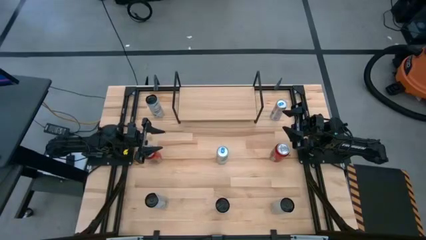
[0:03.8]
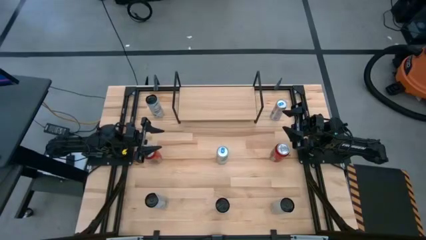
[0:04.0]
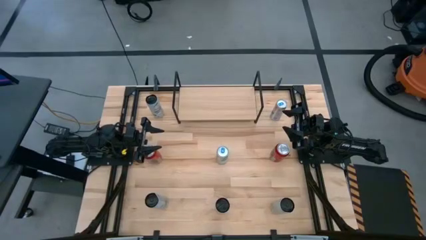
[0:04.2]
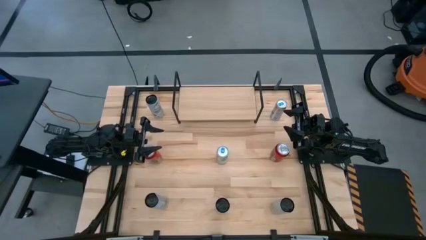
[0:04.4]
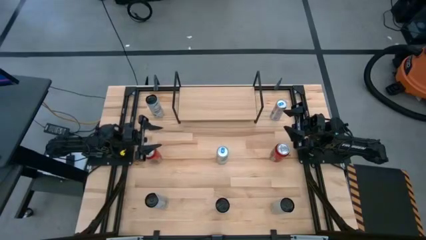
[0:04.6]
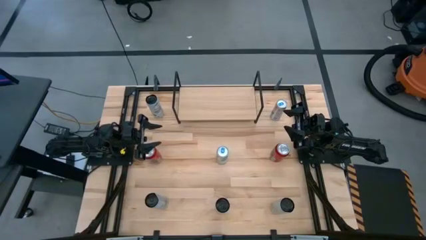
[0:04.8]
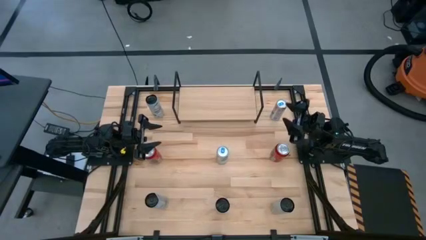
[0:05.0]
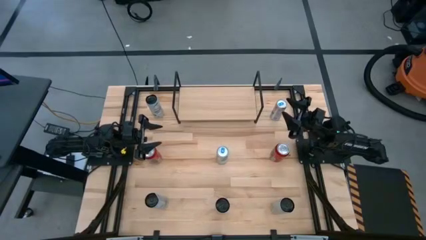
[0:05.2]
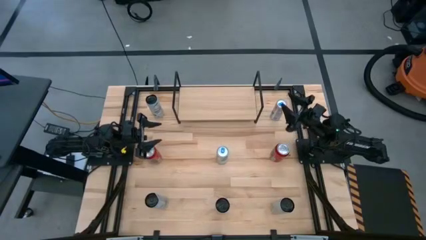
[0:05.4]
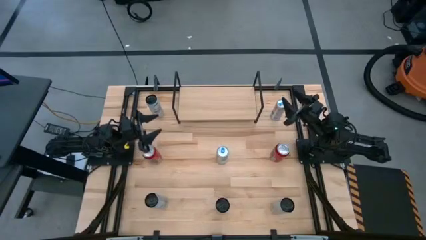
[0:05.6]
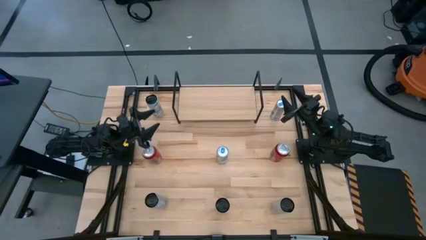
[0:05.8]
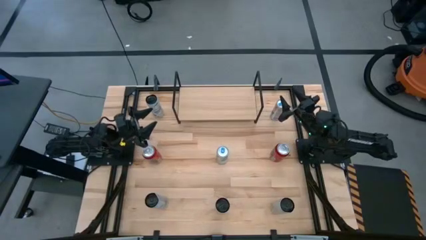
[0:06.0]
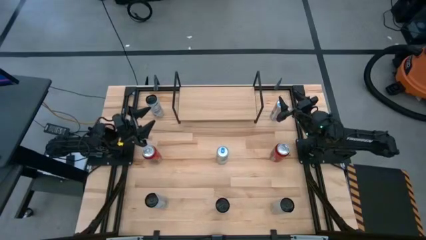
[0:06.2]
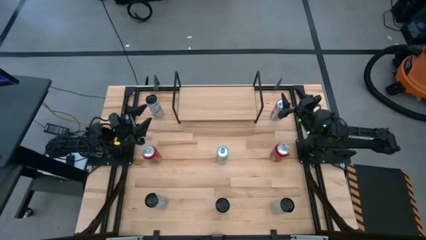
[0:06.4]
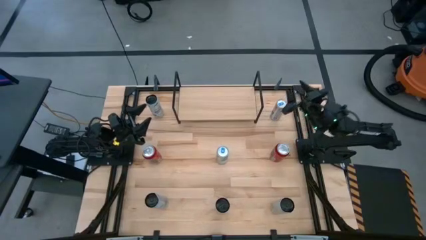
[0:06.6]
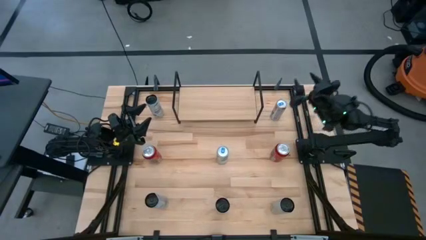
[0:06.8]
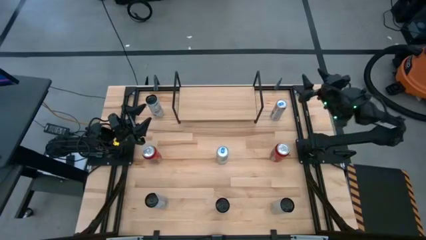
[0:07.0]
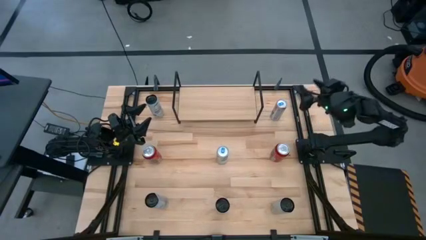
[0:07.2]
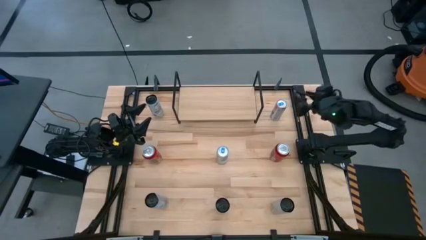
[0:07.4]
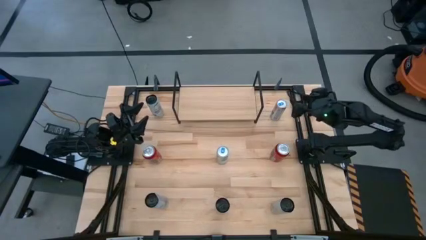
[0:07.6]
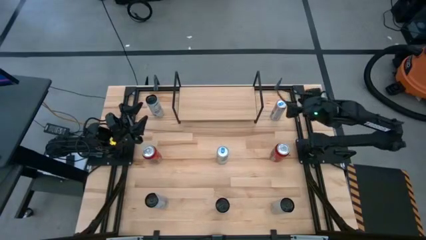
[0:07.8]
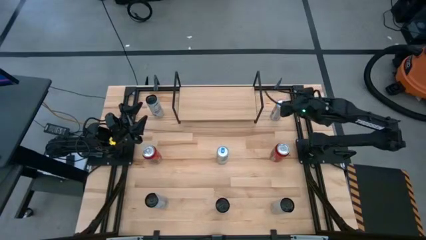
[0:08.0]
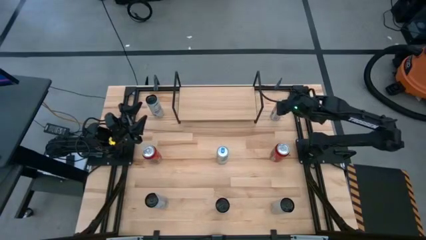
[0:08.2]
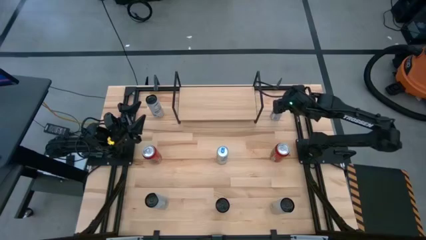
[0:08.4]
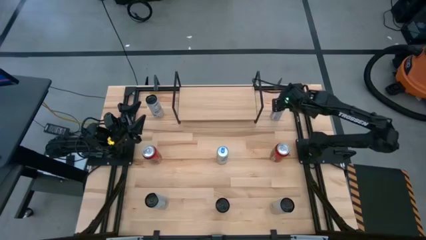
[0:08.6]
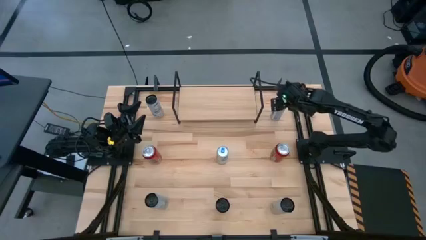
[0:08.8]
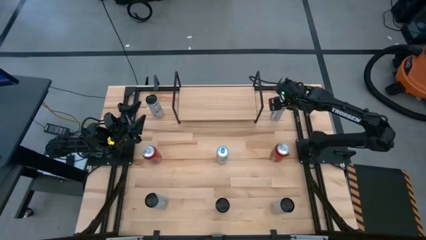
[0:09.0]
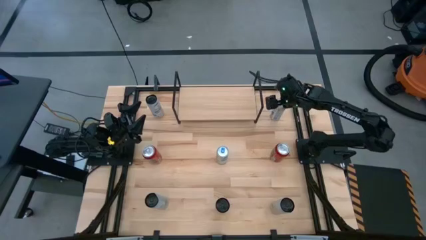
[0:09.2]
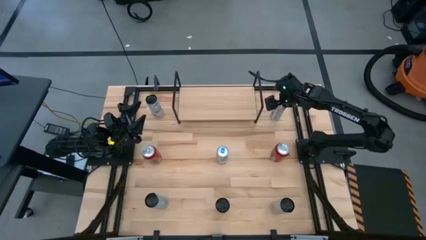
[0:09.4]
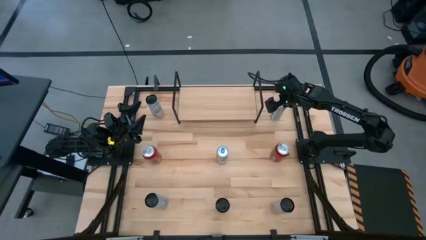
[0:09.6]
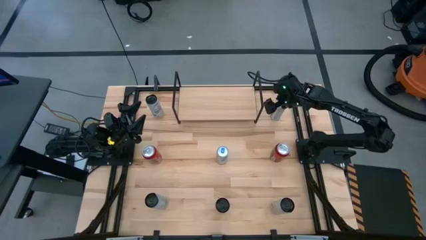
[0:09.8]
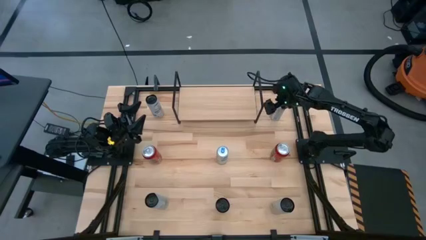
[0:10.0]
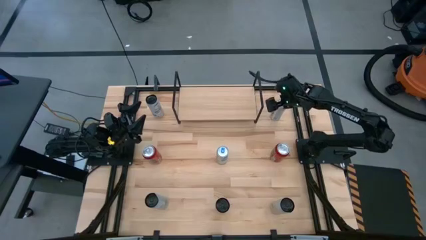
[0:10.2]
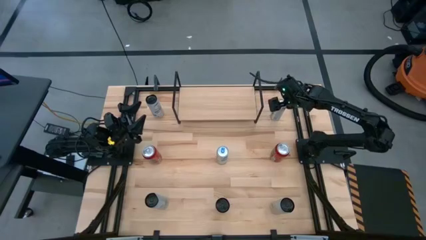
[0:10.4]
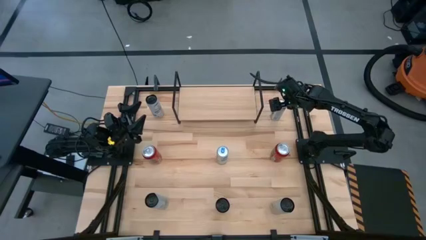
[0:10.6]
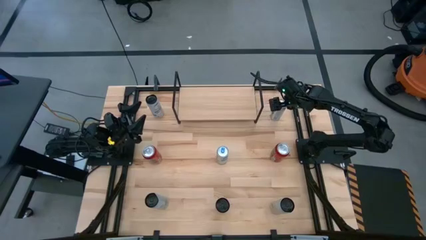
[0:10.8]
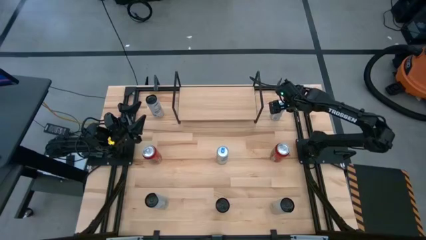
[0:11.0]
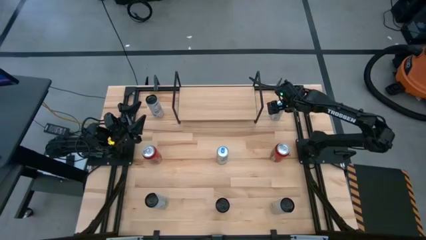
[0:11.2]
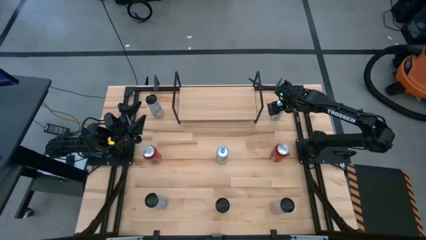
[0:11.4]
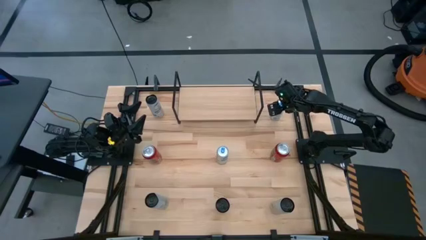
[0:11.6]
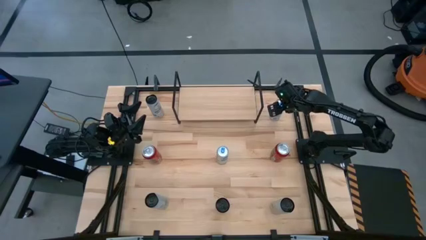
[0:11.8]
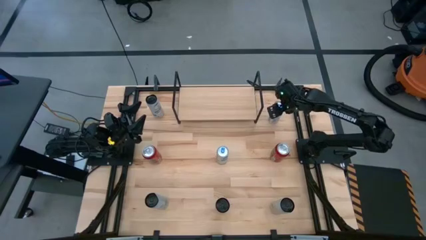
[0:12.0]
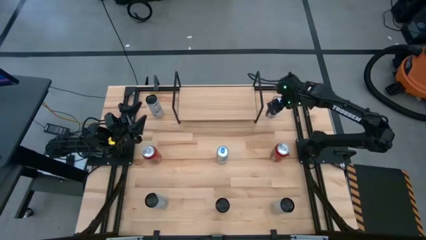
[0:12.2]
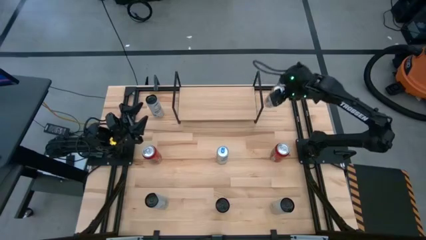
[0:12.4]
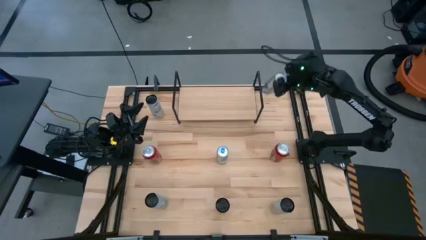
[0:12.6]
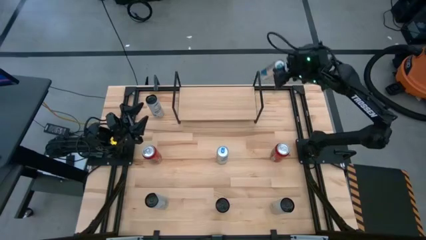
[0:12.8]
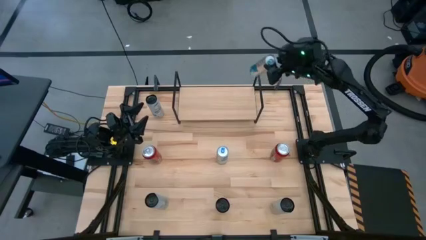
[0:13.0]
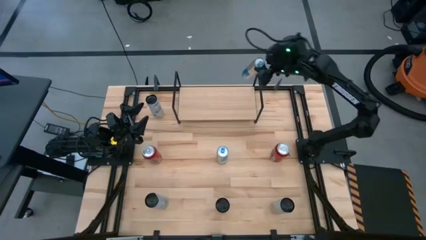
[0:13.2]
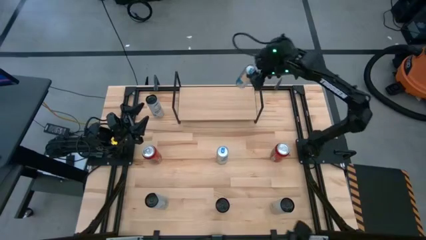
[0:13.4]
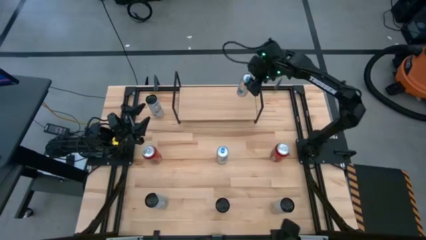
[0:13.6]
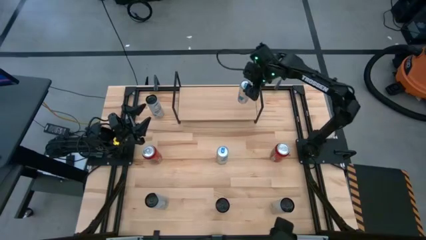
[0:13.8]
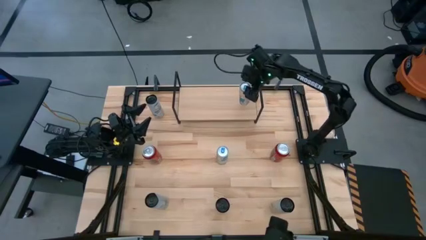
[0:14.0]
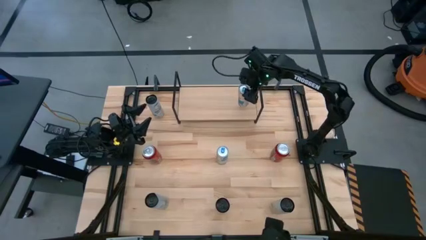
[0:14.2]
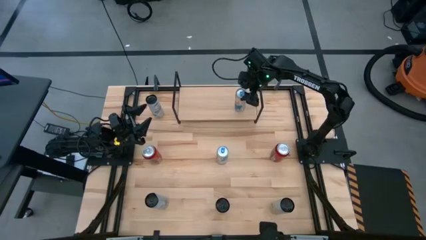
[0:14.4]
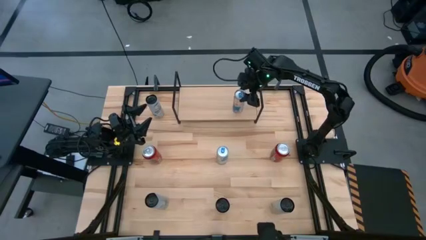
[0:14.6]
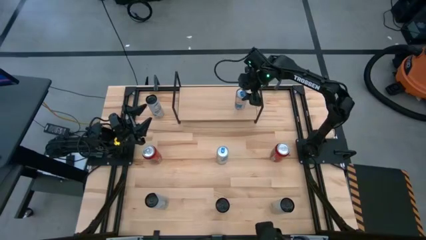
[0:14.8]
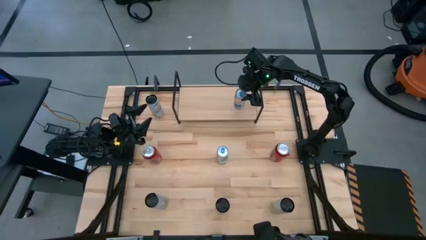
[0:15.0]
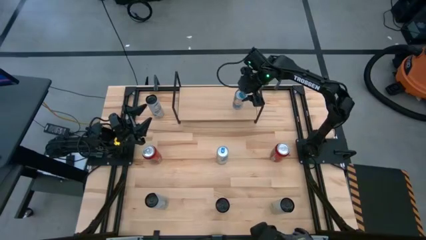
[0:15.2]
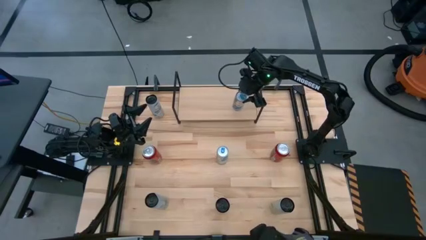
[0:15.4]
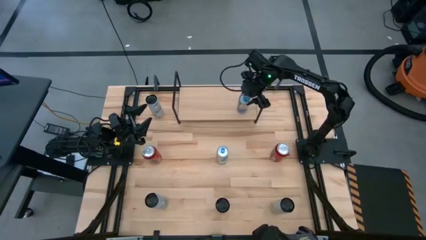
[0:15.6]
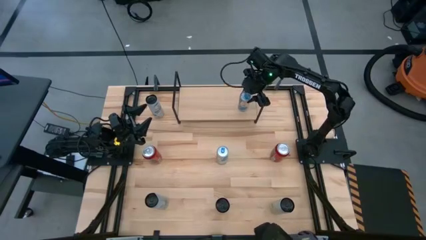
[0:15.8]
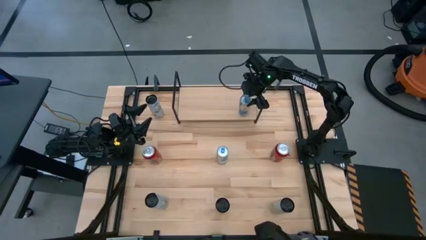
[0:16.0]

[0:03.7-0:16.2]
Task: Place canned beverage on shelf
Put the top blue soda can on the shelf
